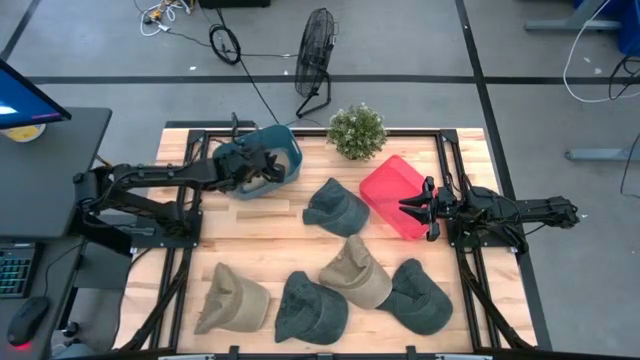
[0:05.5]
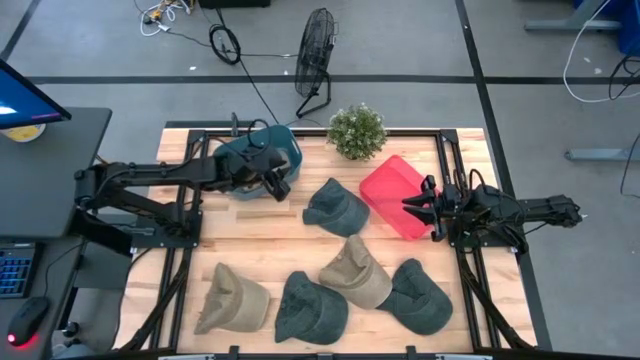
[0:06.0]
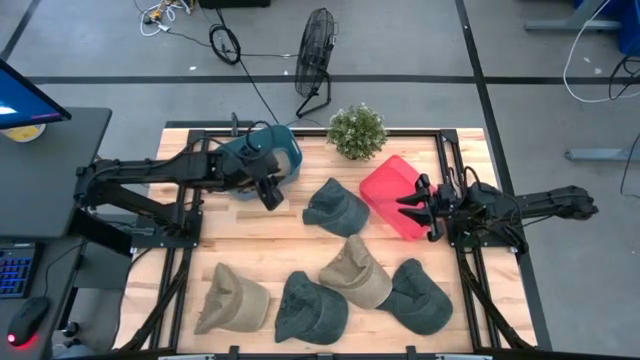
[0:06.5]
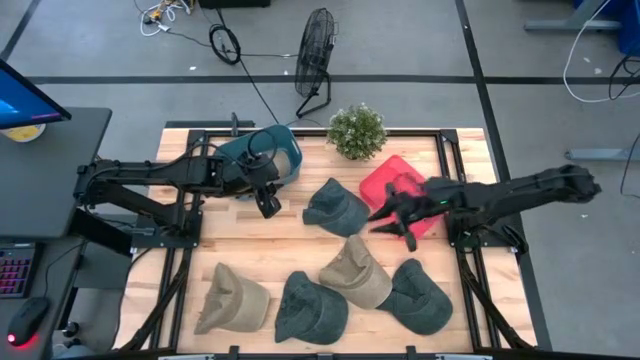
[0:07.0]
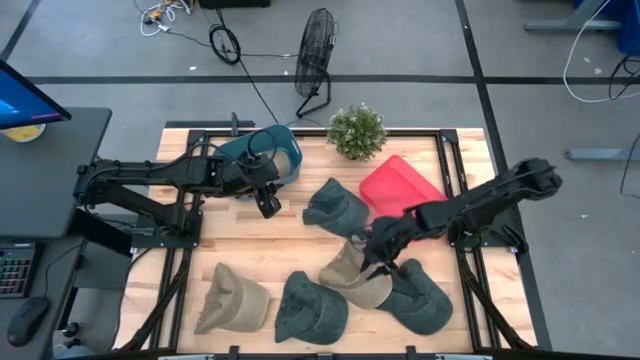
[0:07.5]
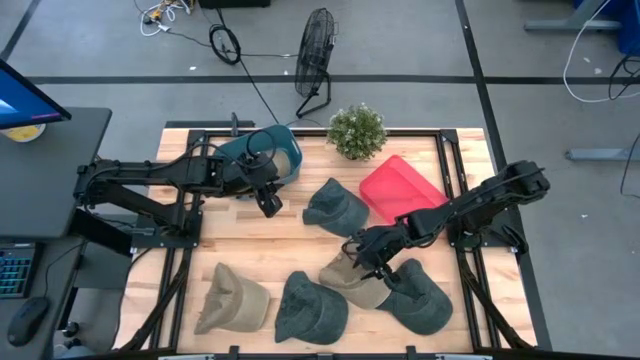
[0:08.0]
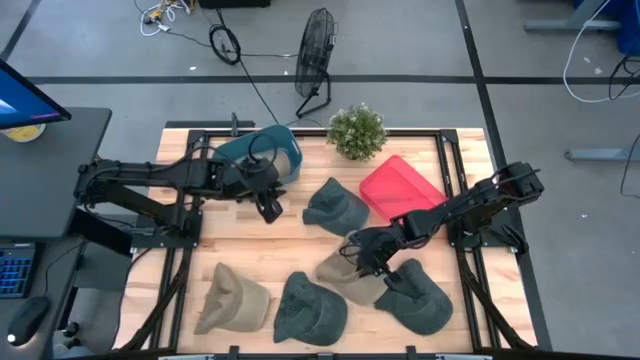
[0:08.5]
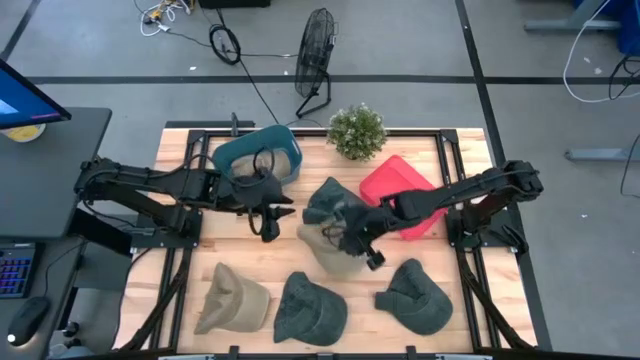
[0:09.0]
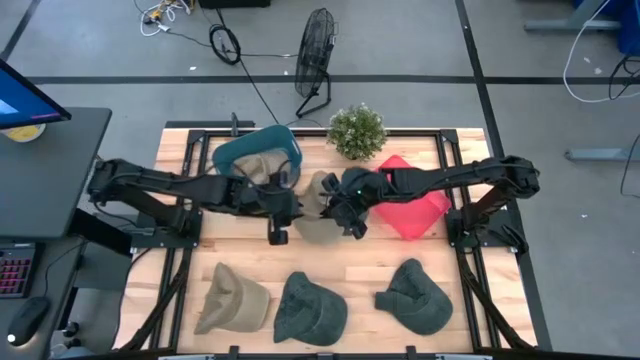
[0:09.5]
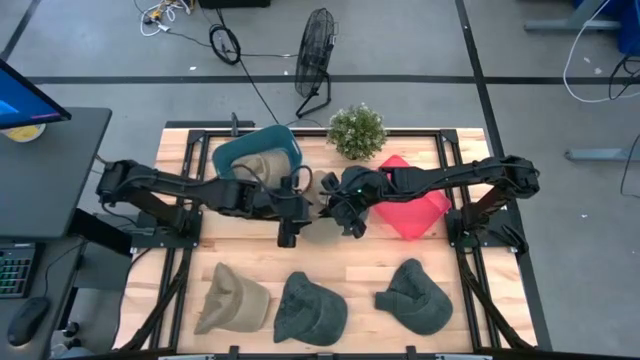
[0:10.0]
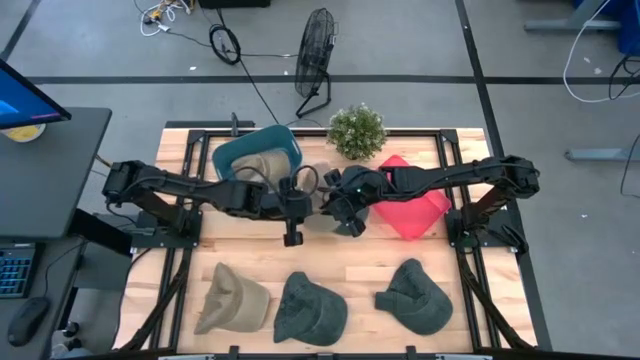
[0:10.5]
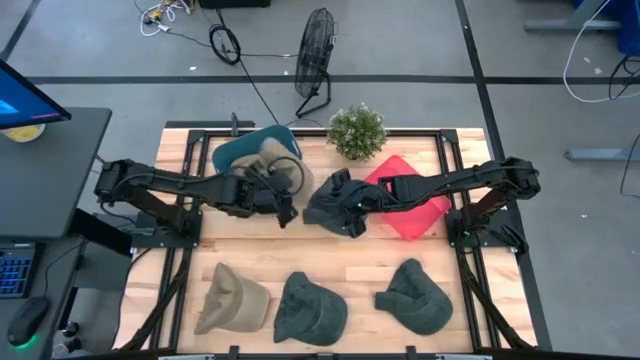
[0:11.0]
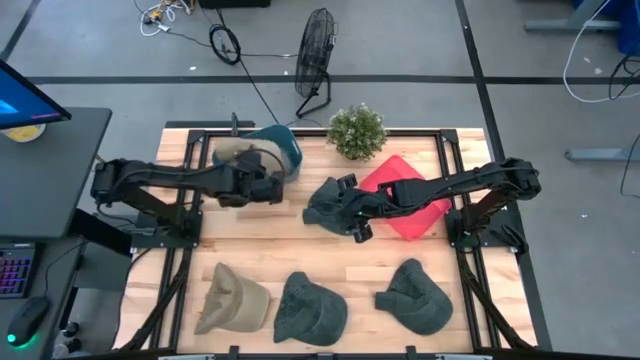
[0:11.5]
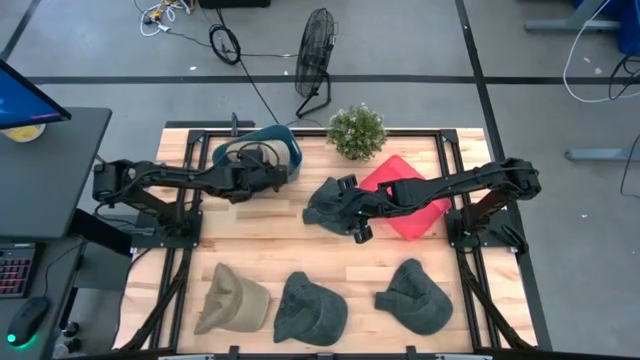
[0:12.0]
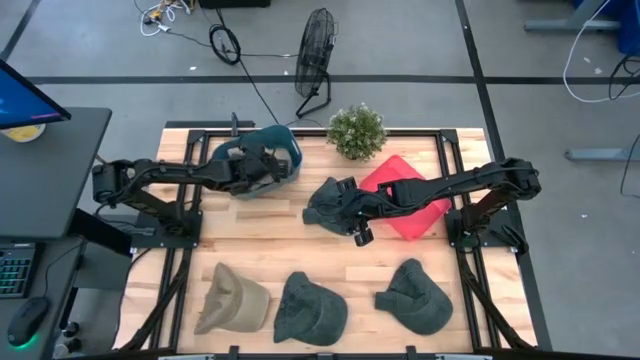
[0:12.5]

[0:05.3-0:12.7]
Task: Pick & Place hat
Put the right brown cap into the blue bin

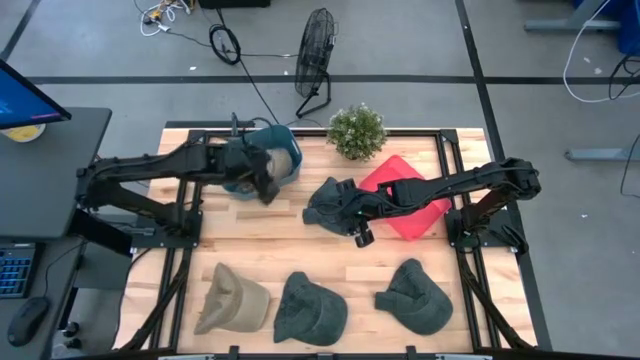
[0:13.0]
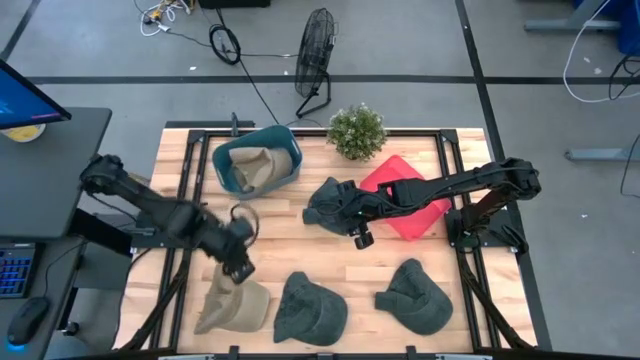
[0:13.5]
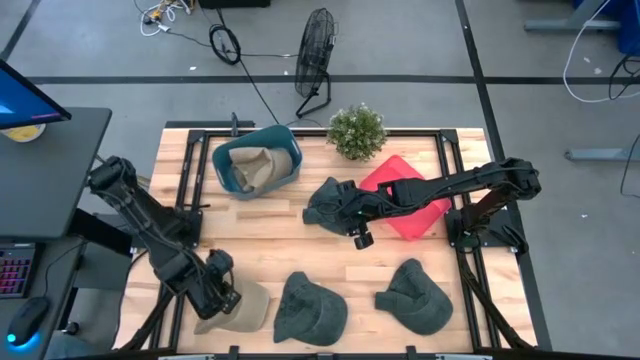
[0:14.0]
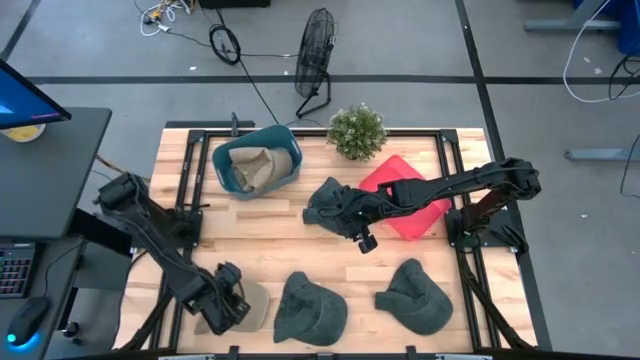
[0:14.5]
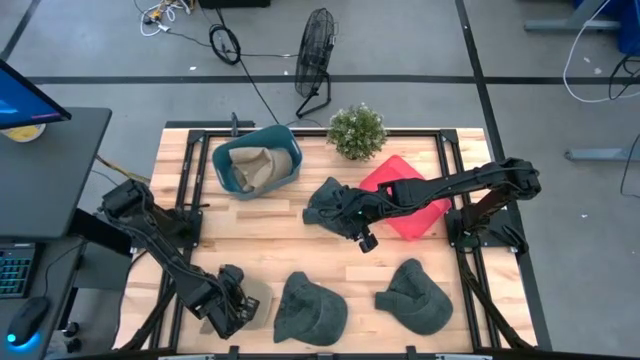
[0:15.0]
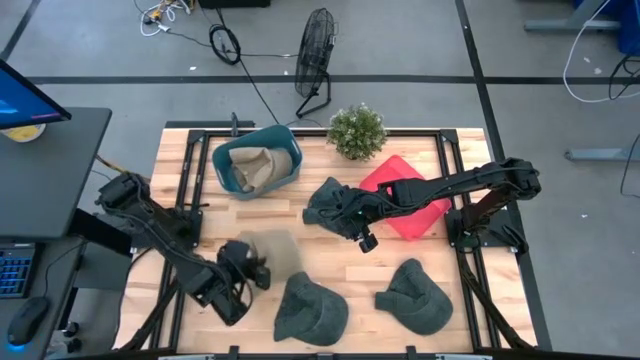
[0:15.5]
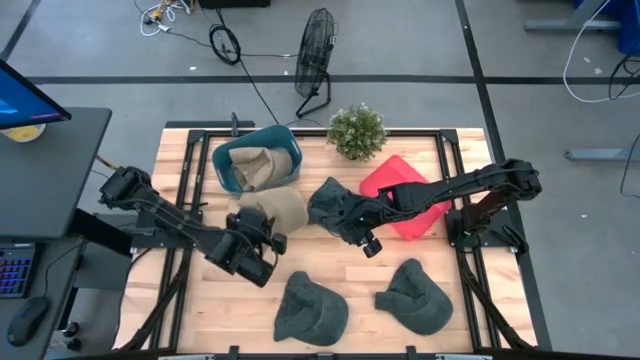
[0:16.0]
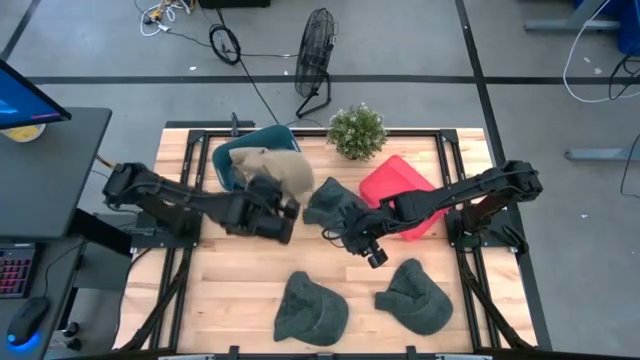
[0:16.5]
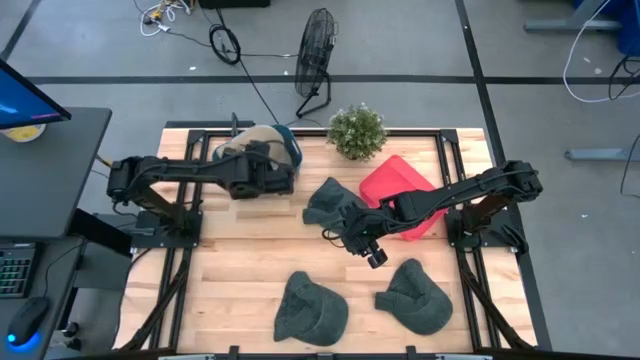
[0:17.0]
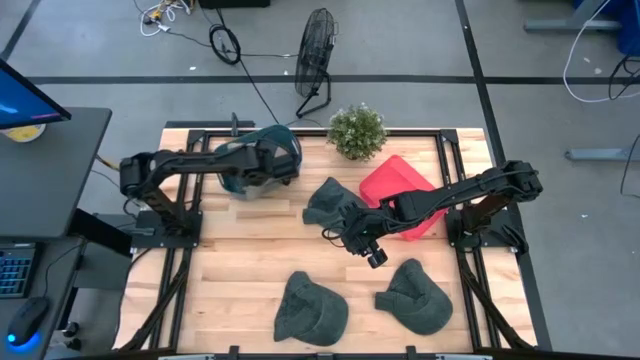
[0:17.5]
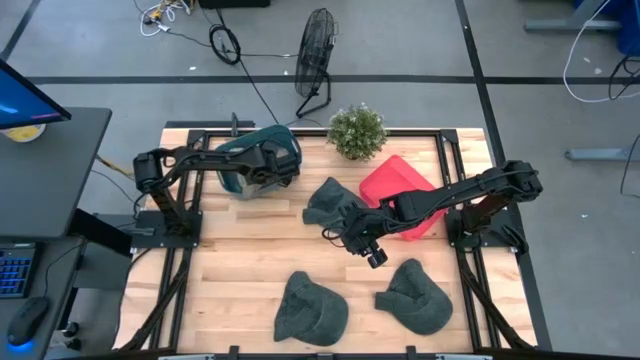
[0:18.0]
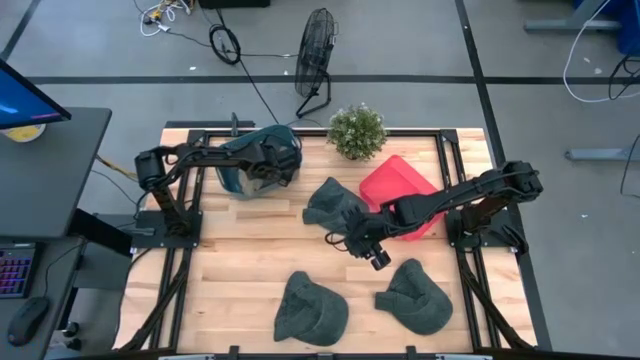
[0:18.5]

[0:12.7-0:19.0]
Put the brown cap into the blue bin

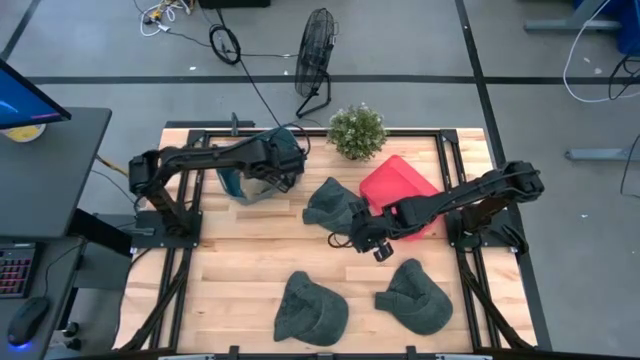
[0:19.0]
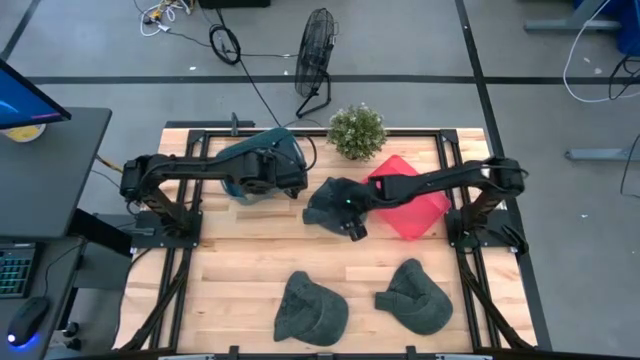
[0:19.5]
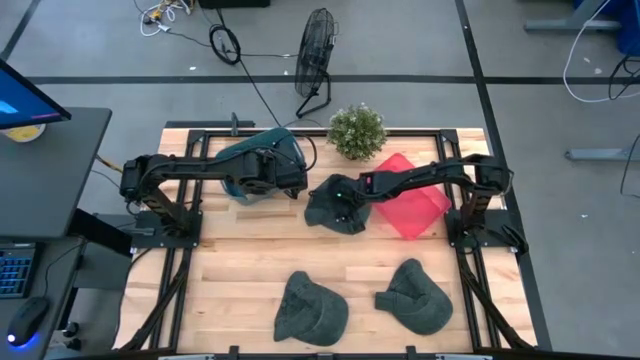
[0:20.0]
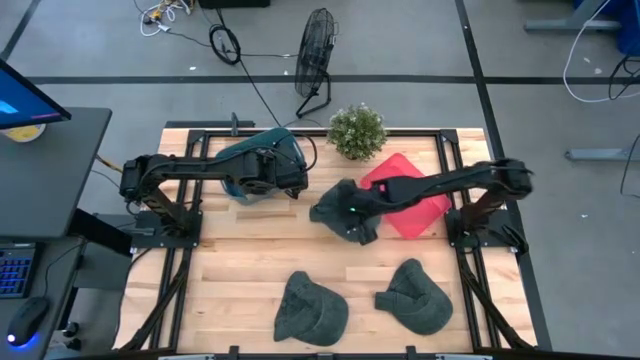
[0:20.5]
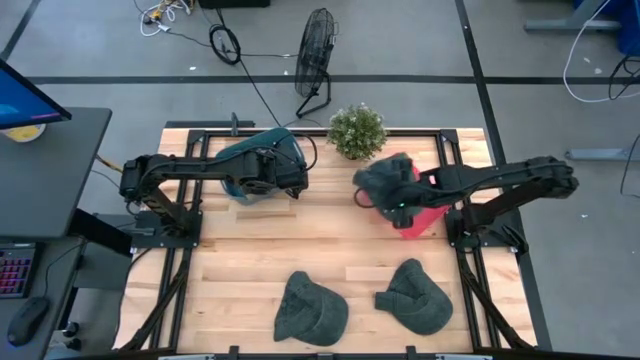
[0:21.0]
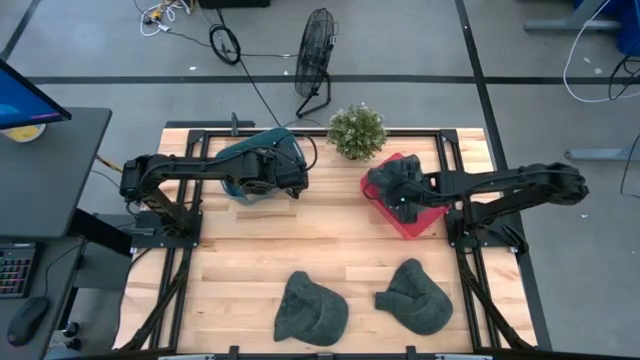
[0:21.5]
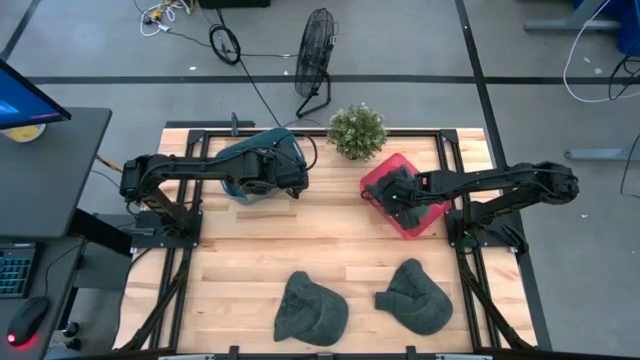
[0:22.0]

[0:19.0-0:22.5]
Put the top black cap into the red bin

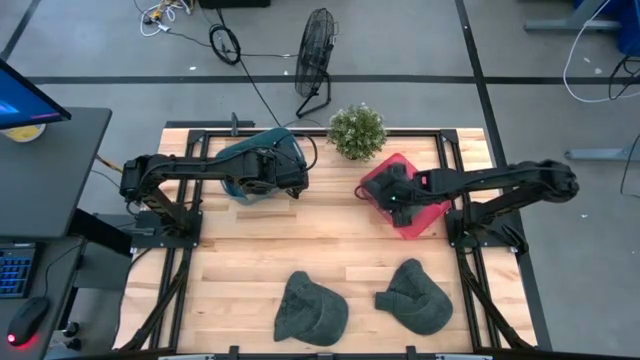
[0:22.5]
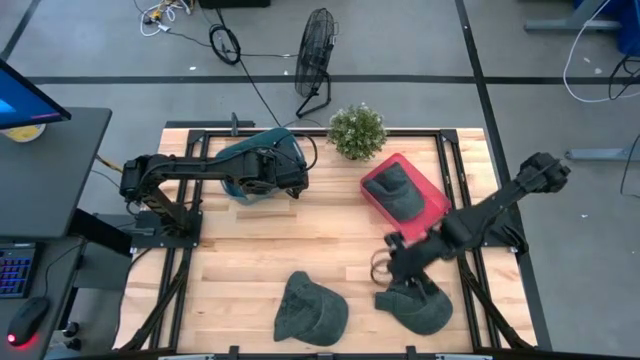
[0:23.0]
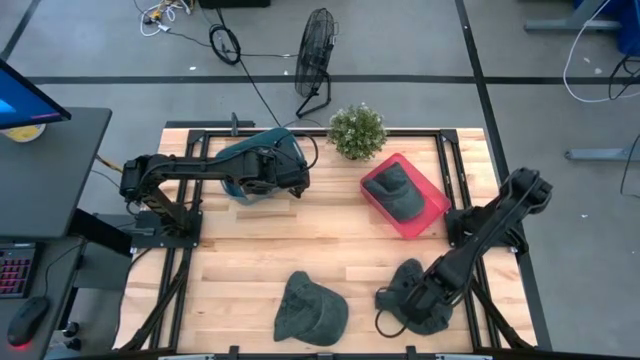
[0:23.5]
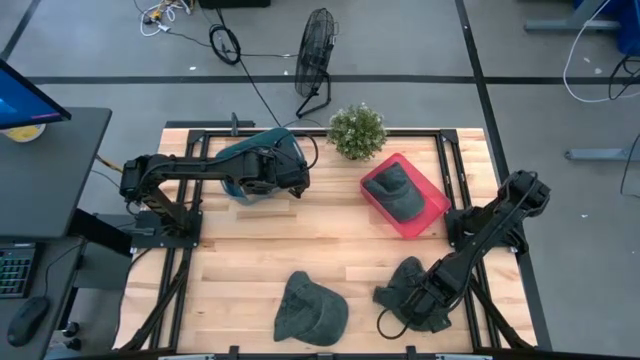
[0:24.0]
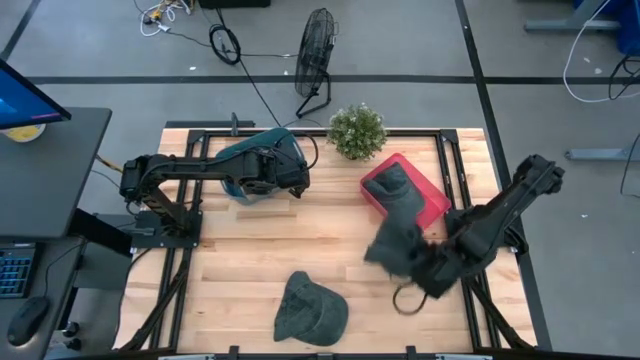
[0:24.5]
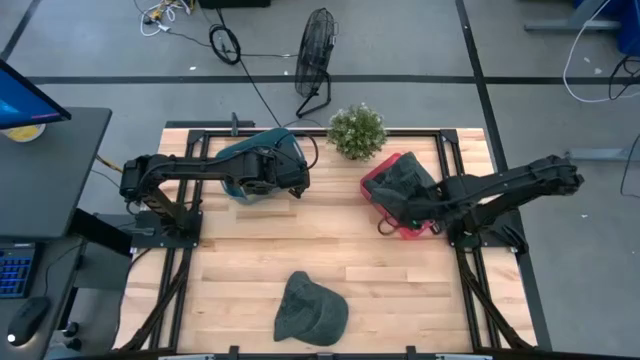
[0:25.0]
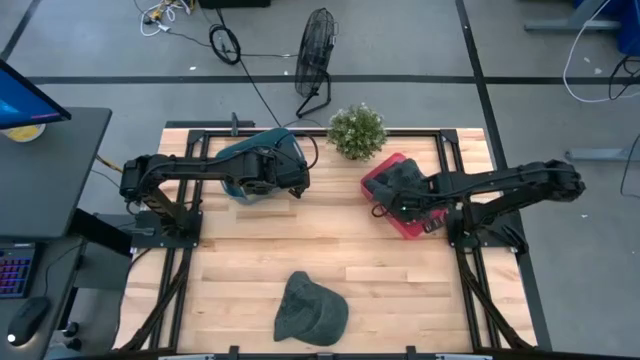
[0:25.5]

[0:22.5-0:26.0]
Put the right black cap into the red bin
